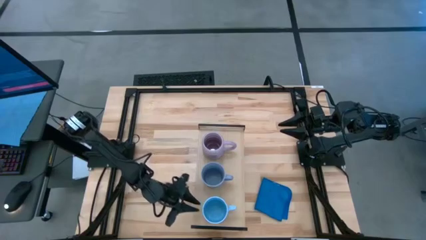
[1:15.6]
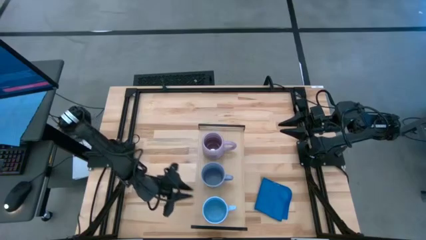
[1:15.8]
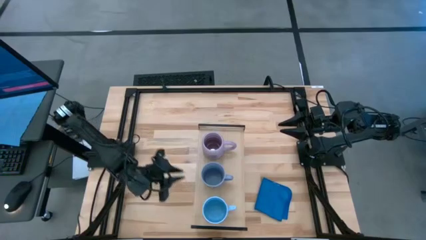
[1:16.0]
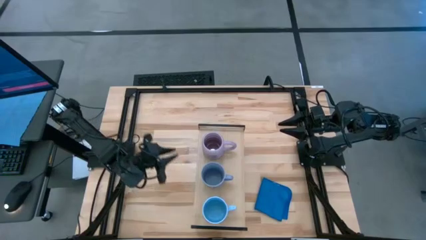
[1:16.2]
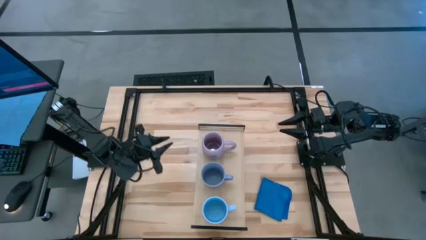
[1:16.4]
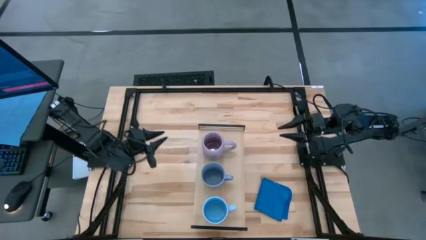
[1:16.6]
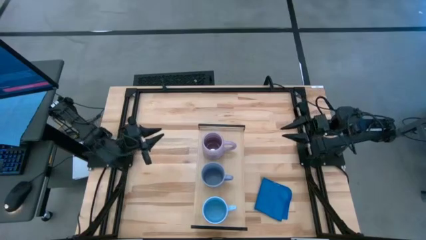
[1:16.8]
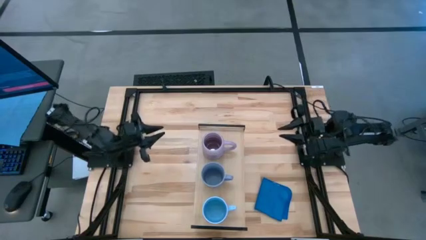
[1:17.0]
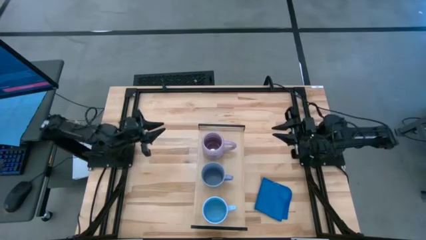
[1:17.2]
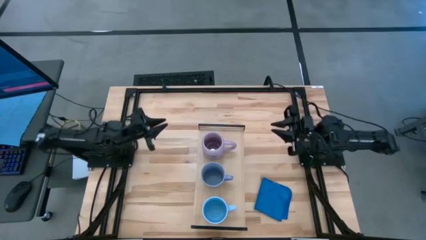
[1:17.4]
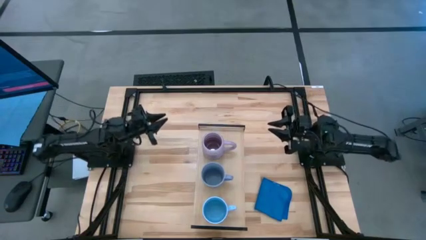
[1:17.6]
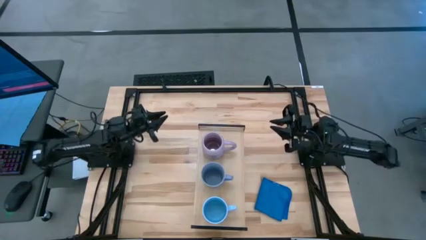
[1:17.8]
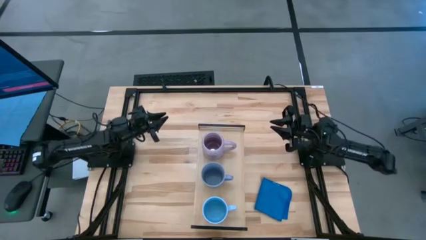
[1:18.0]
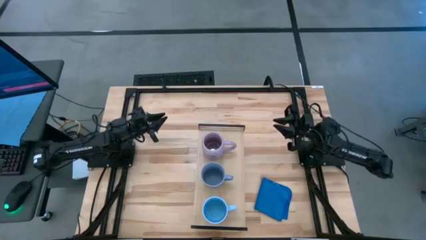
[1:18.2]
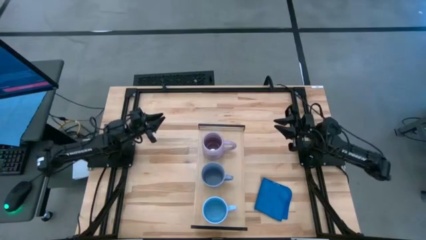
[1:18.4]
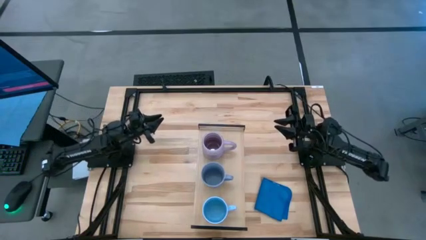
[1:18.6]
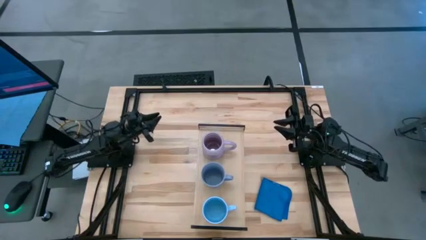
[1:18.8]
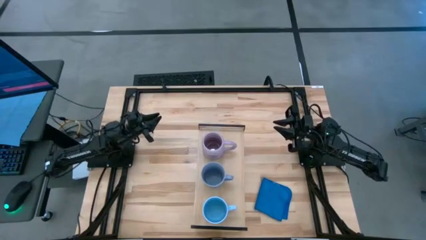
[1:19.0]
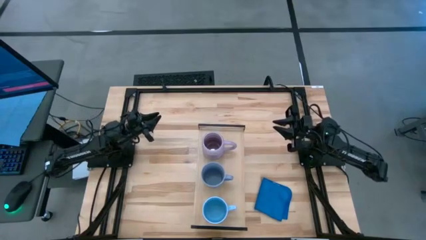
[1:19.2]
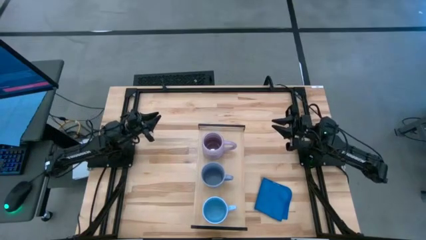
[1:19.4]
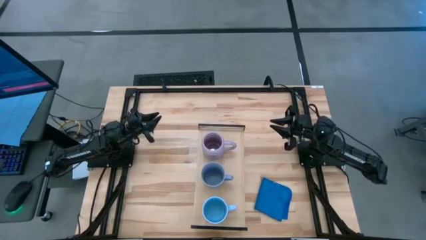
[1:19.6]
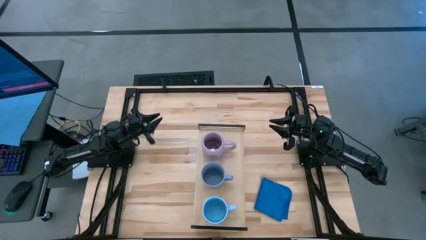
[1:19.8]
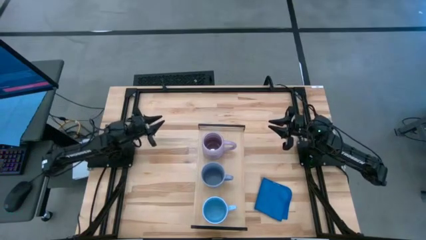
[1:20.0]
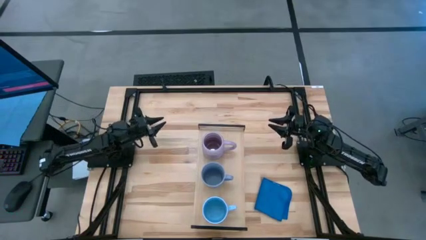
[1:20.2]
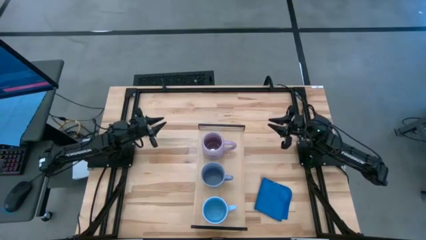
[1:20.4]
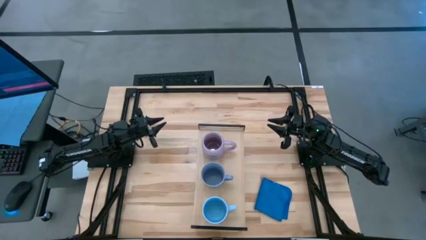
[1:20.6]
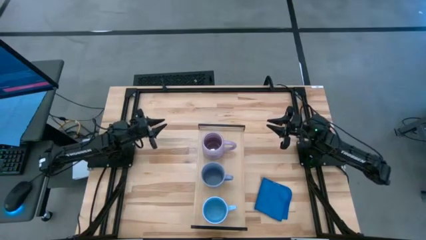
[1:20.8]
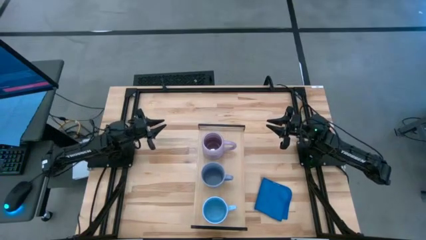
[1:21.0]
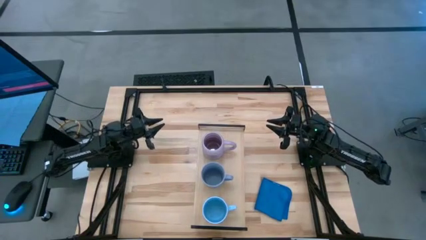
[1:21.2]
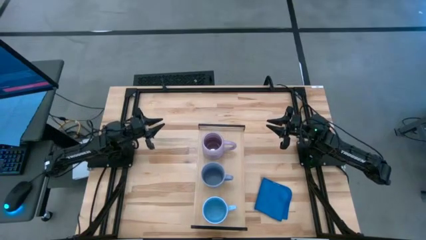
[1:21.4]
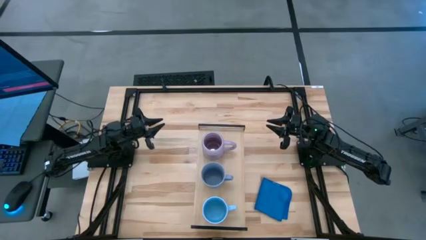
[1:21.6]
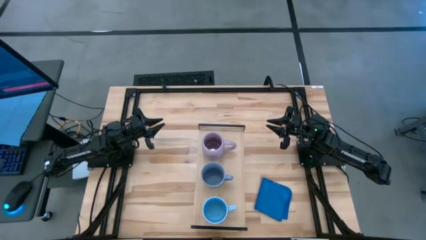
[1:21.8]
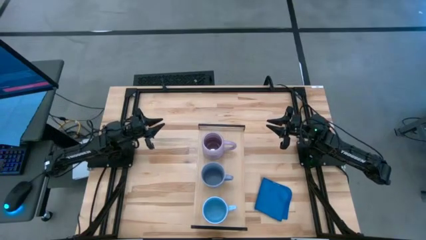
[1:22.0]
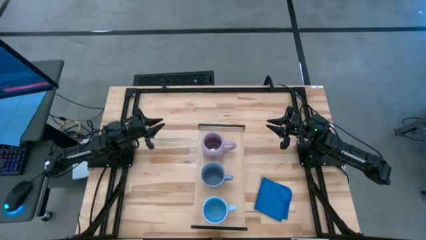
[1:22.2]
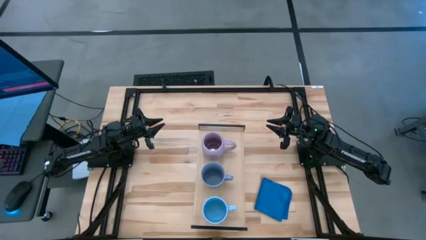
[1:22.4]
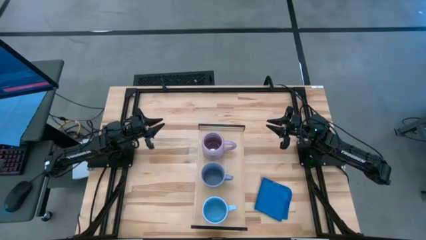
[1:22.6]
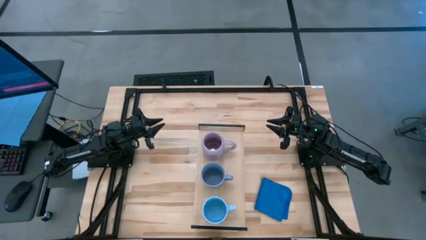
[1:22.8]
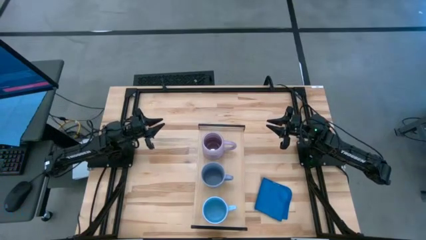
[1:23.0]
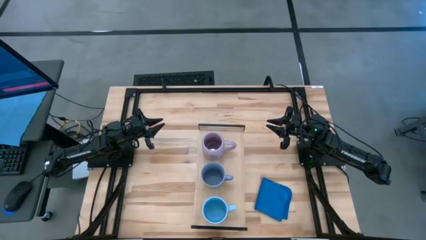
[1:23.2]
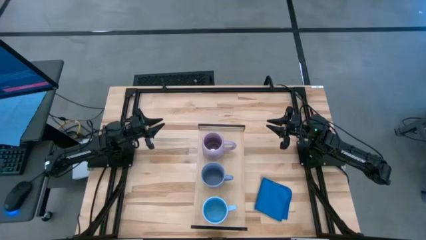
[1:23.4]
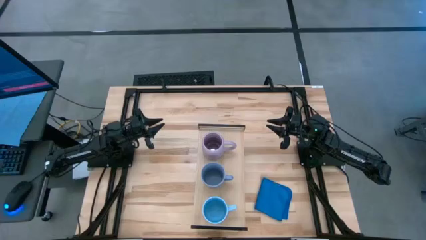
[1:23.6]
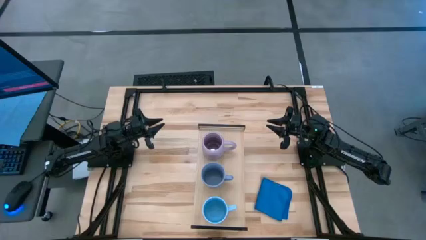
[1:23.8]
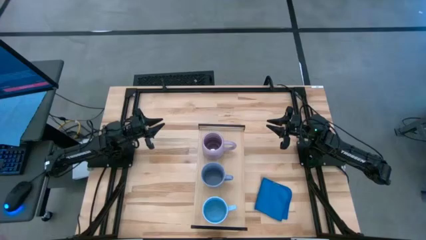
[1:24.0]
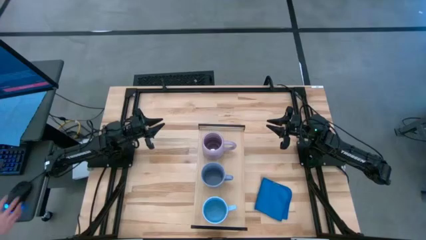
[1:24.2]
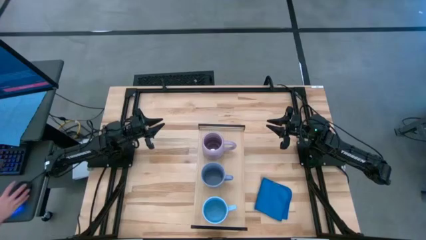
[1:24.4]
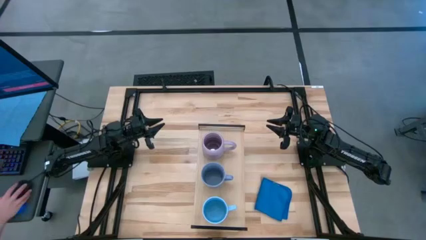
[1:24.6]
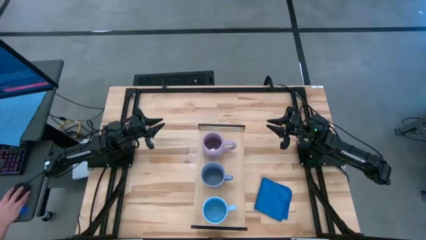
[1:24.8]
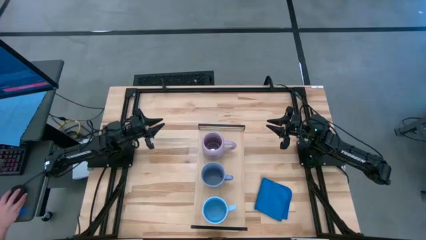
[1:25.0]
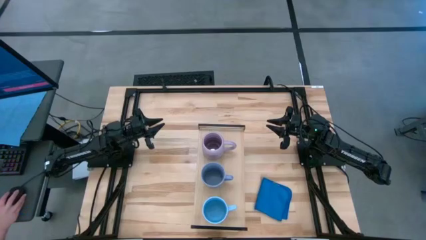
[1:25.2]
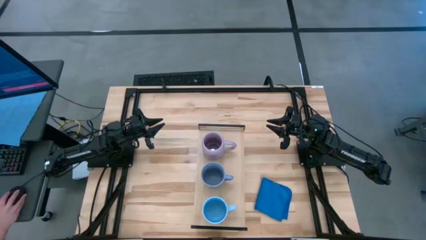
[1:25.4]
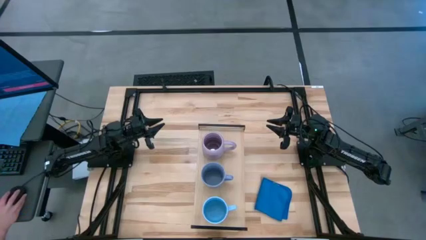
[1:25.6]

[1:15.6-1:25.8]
Task: Stack small to large cups/mugs on shelf
Return to Home Position
